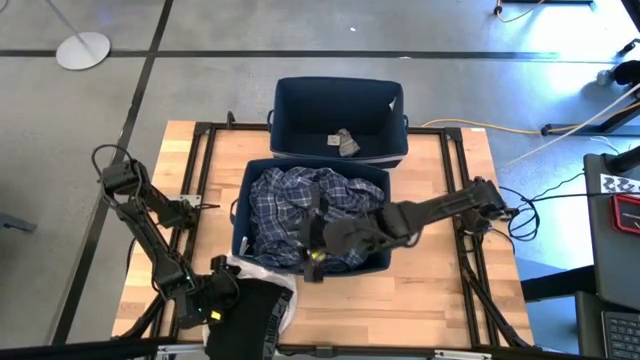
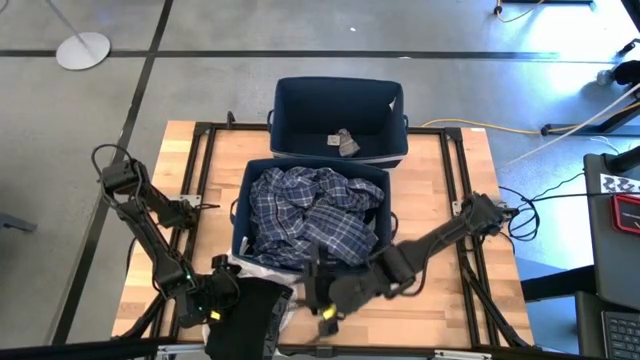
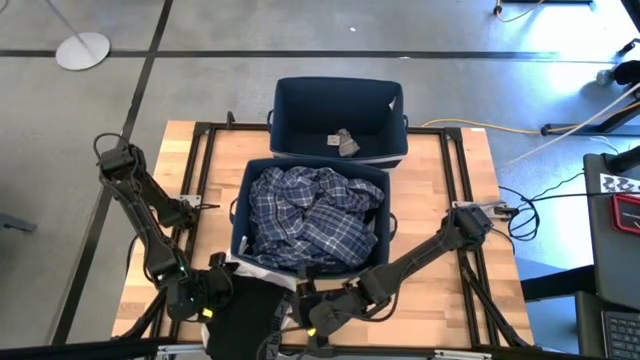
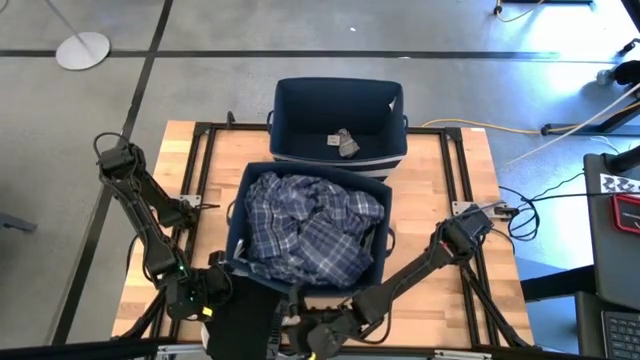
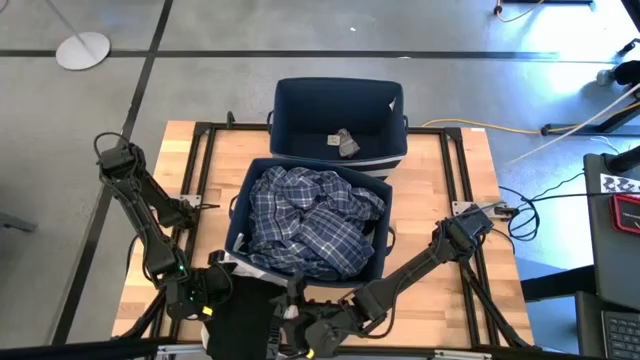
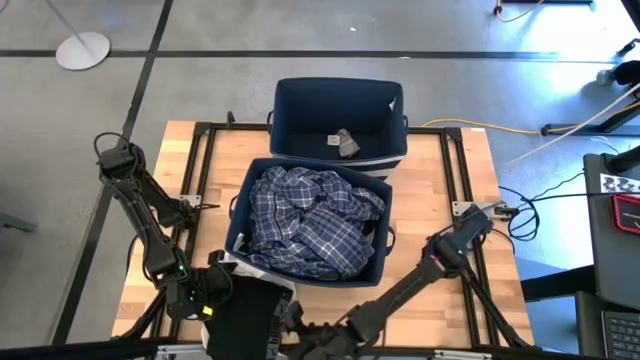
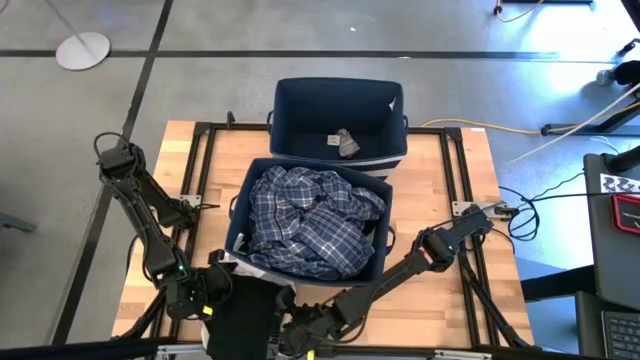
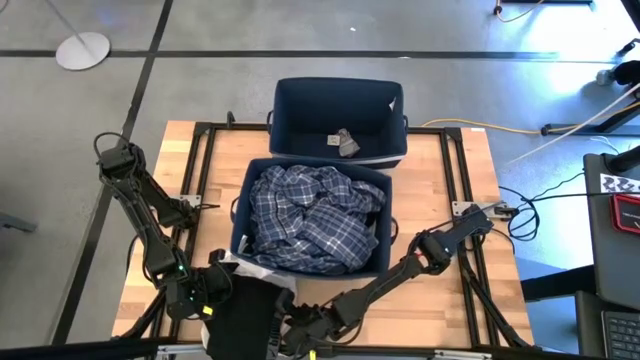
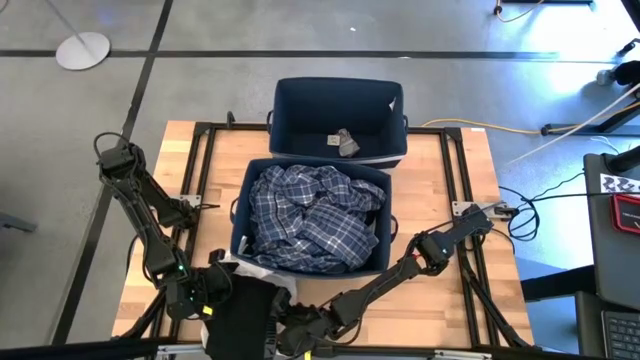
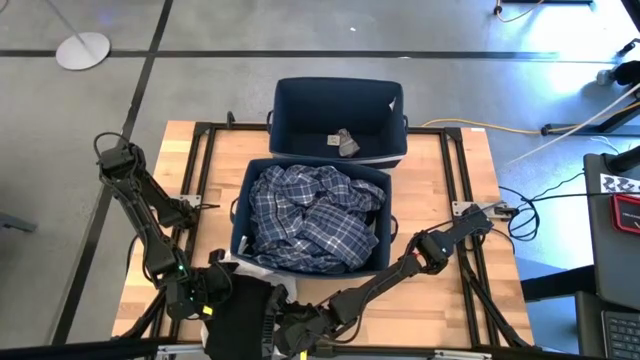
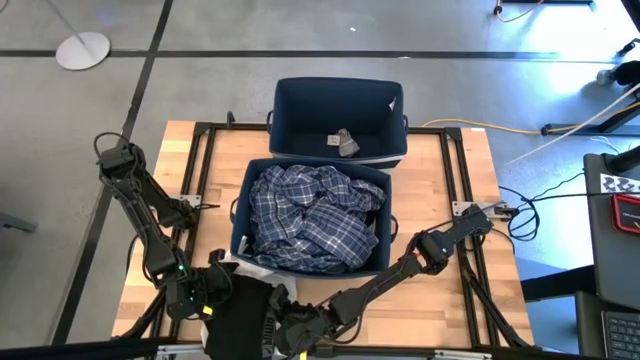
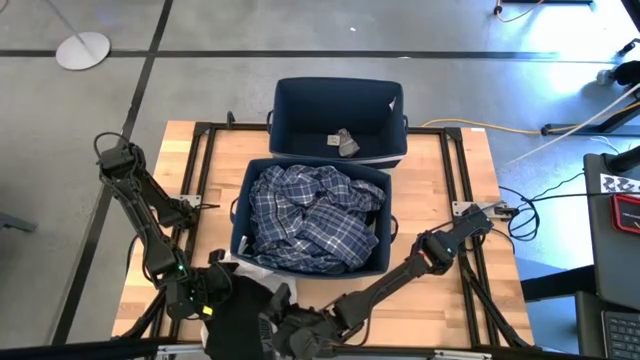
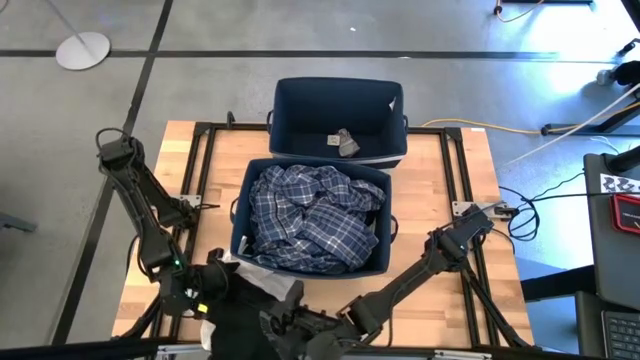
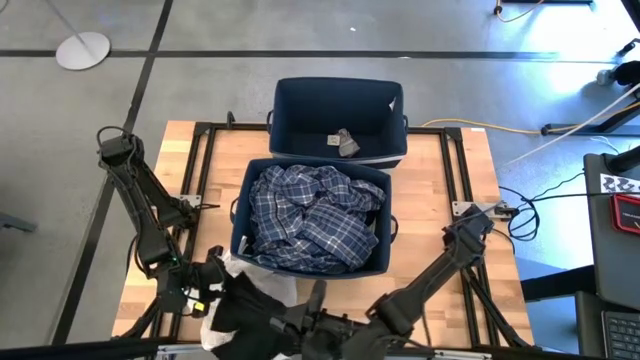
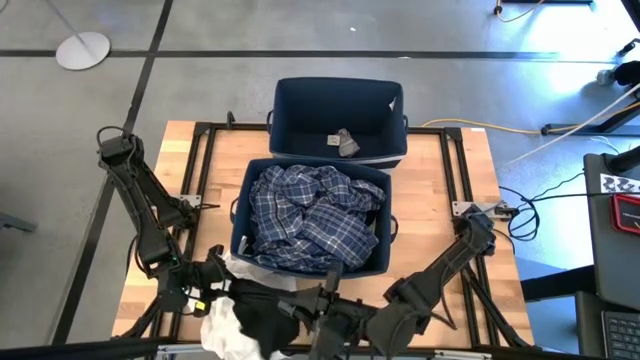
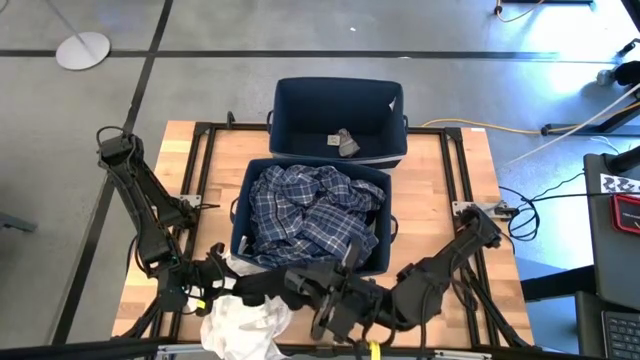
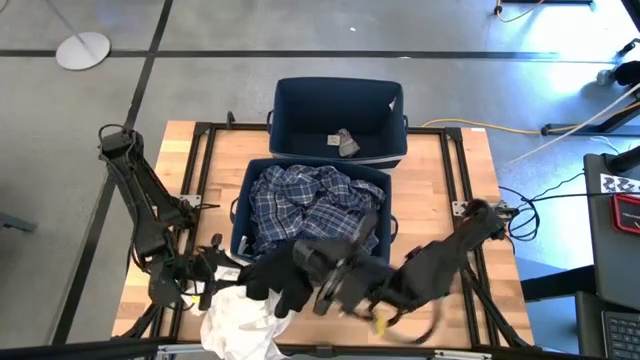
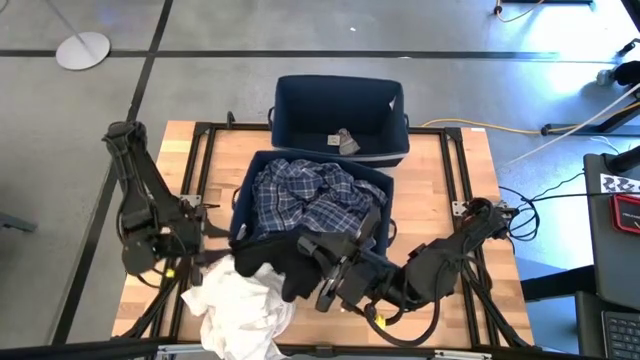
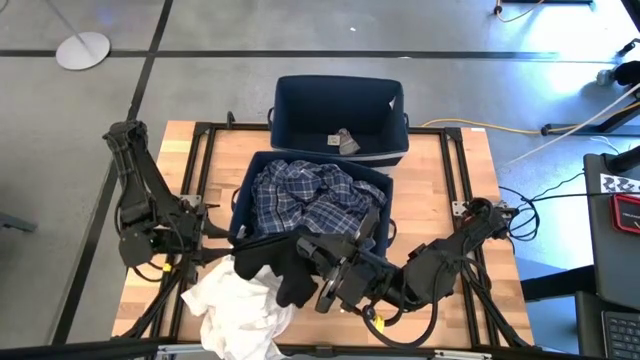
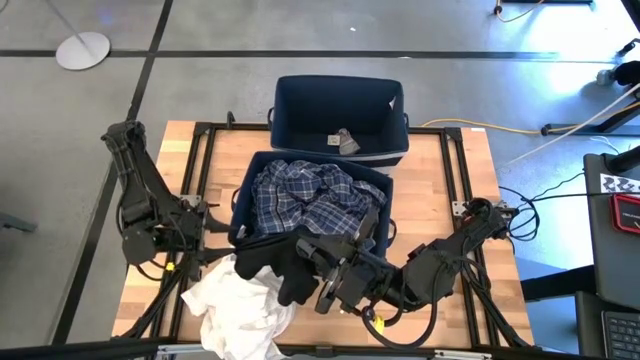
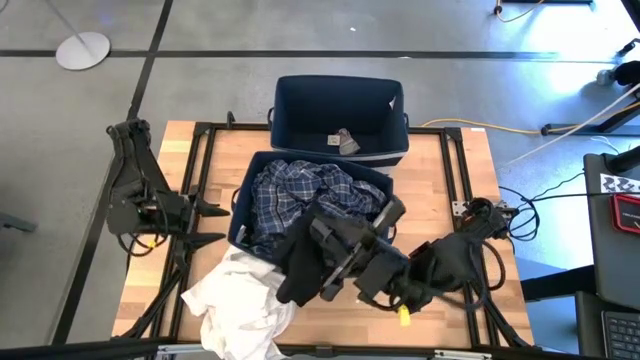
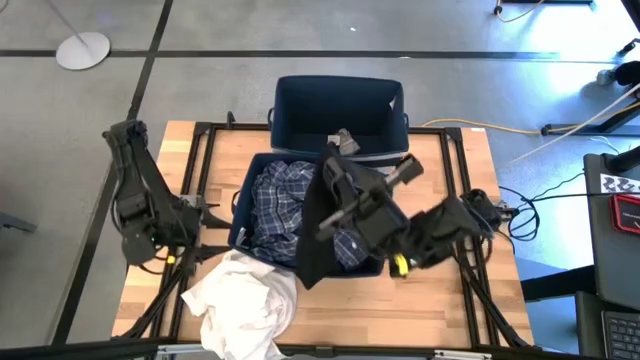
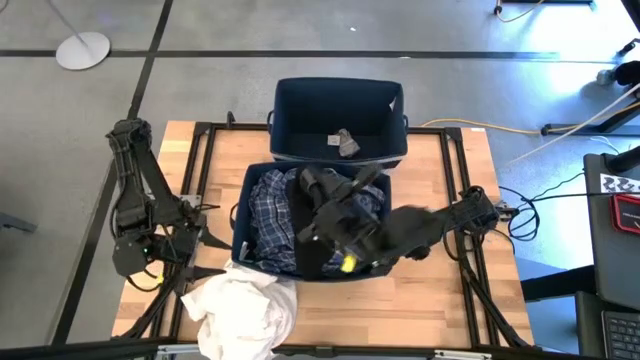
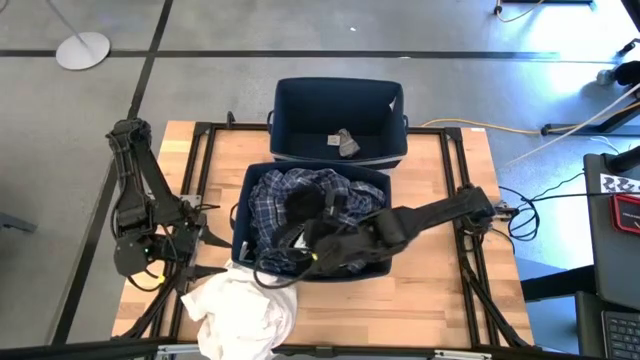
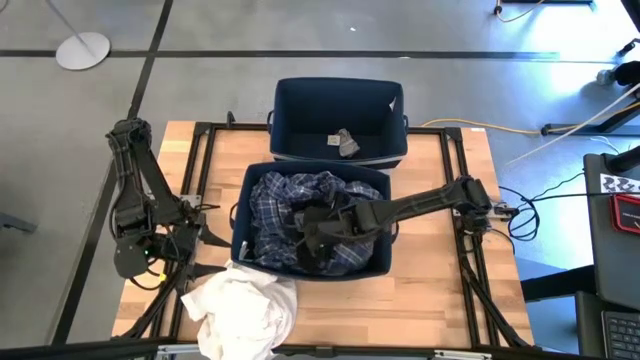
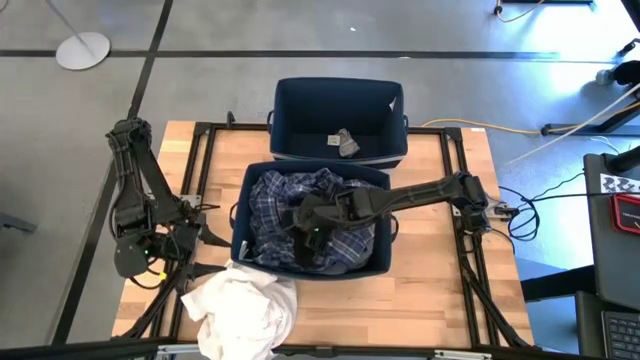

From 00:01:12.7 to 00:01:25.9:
Task: Sort clothes
Put the black boxer into the bottom blue laundry bin

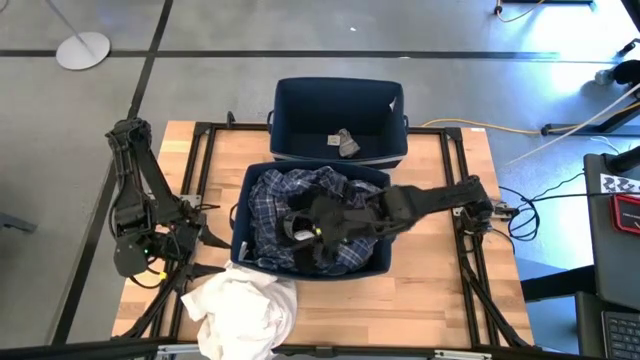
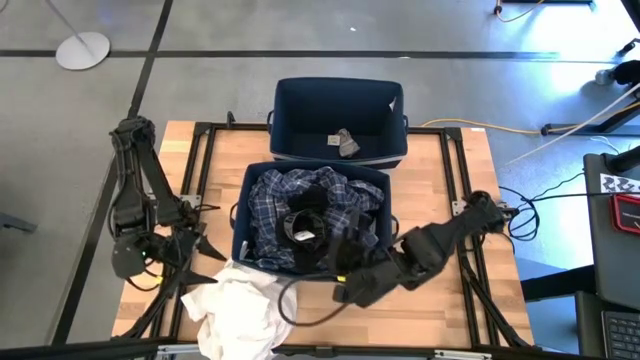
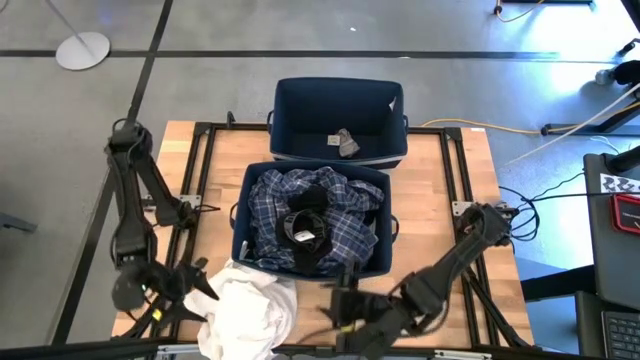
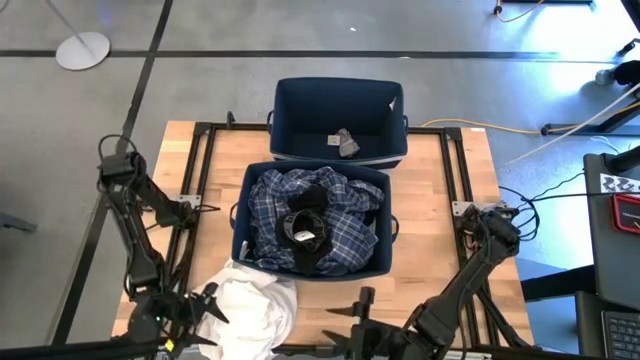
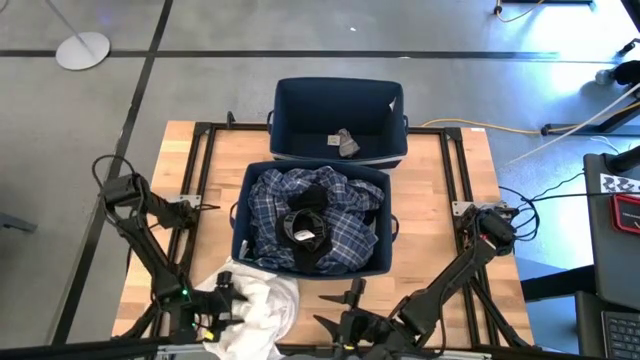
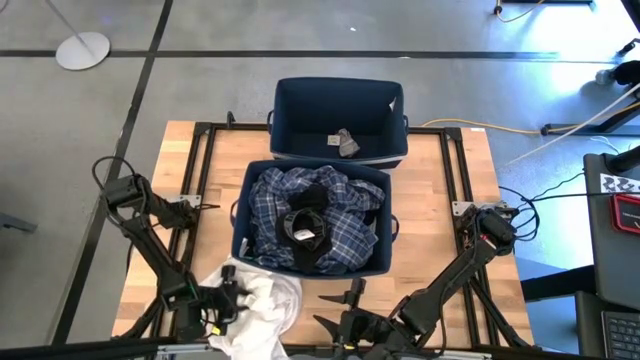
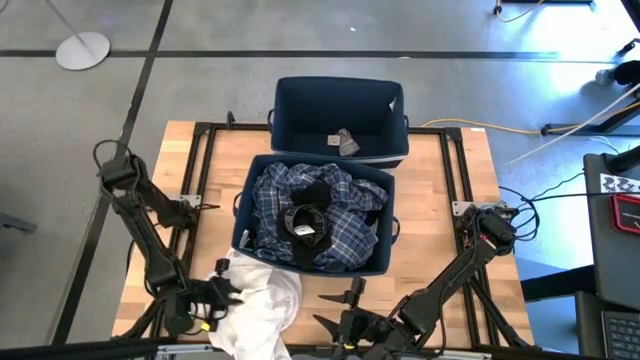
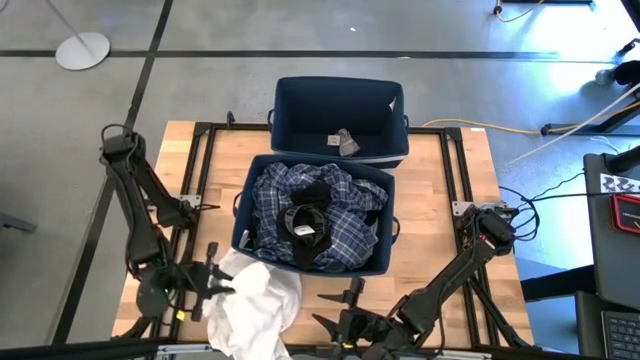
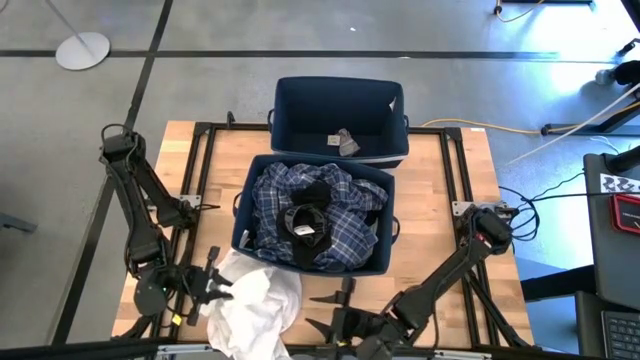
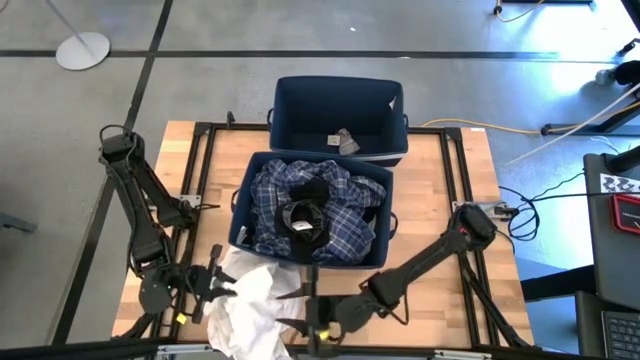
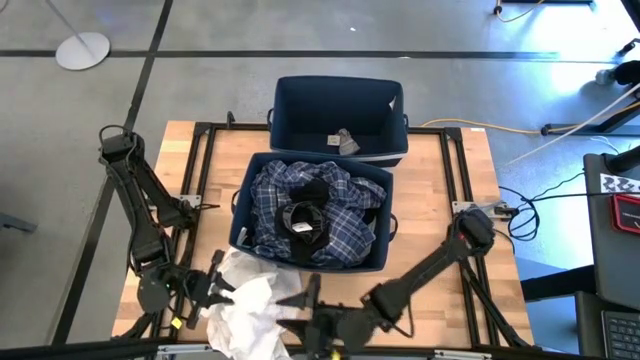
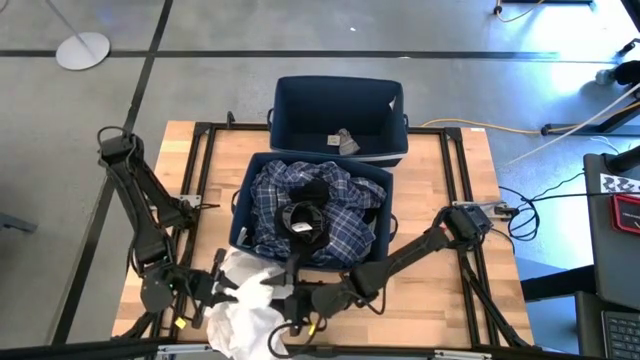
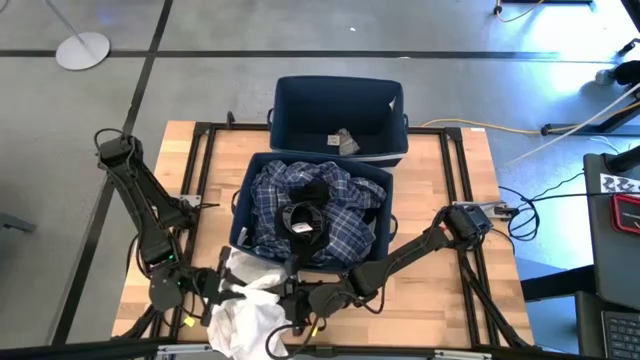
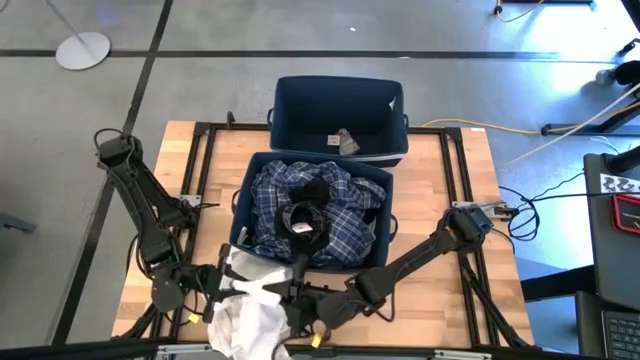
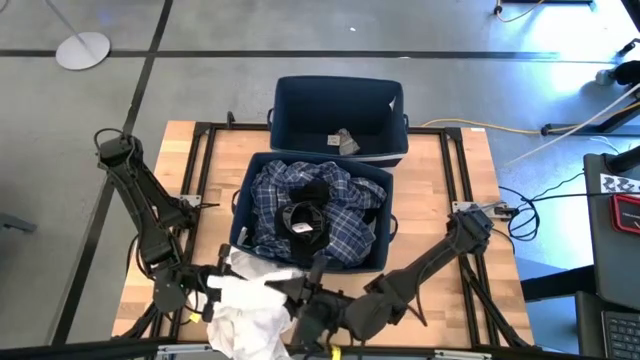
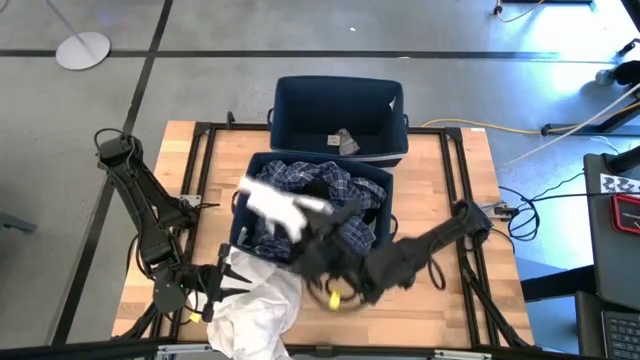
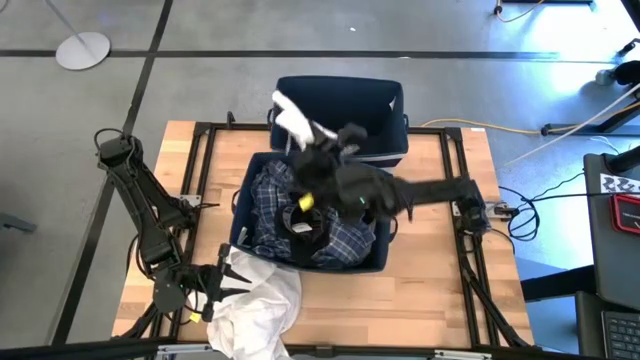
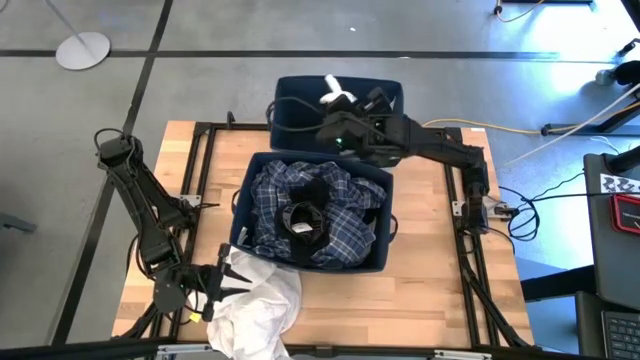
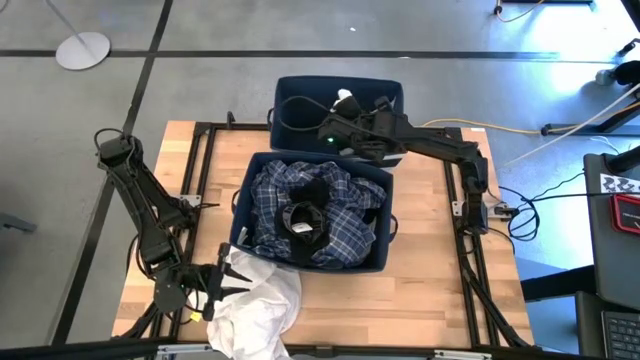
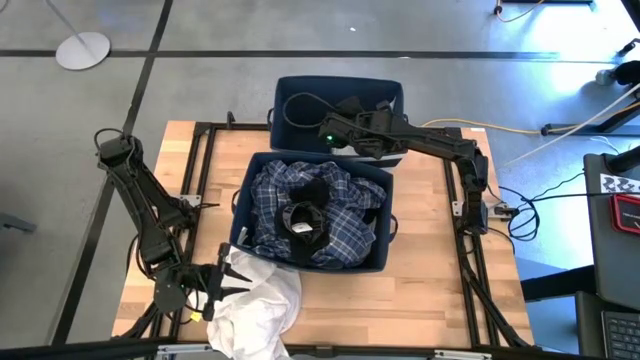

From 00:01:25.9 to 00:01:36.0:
Put the white cloth into the top blue laundry bin
